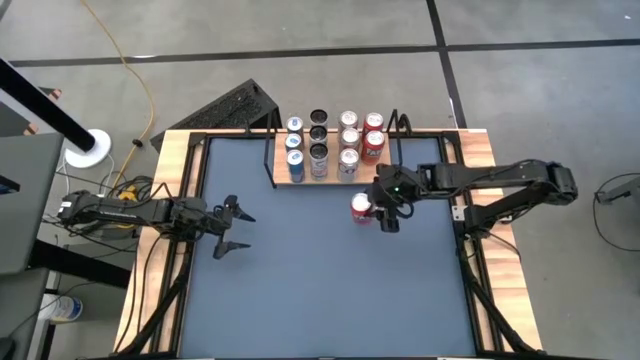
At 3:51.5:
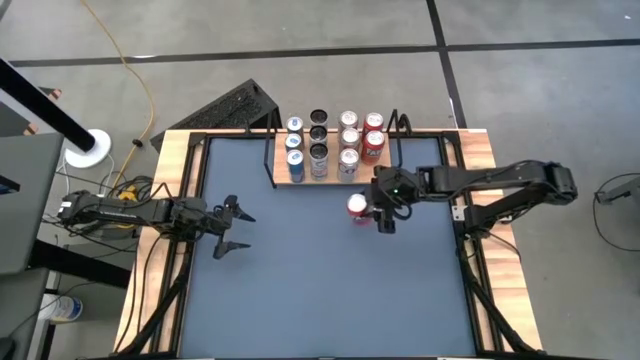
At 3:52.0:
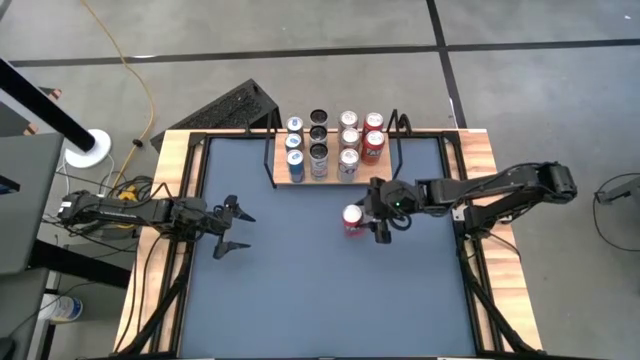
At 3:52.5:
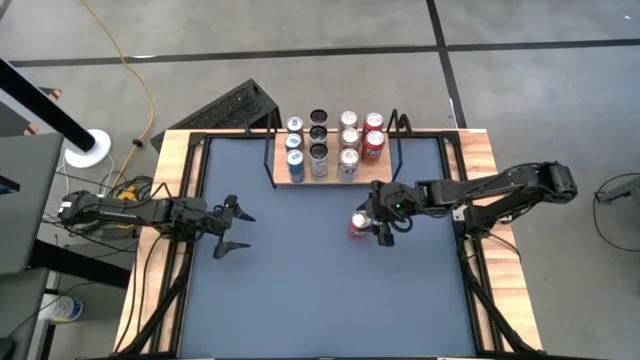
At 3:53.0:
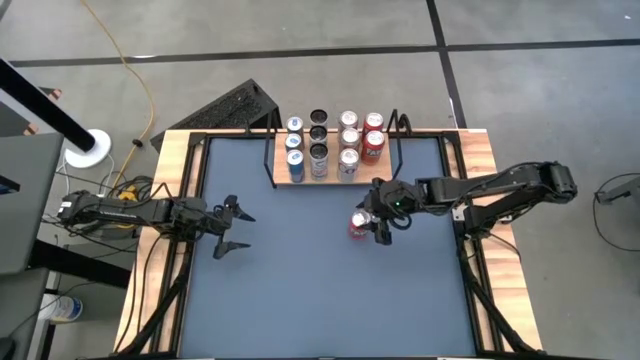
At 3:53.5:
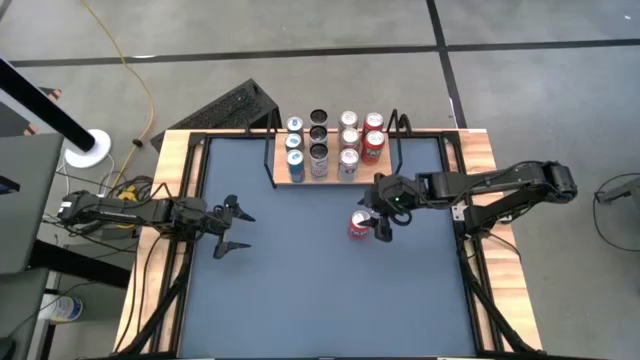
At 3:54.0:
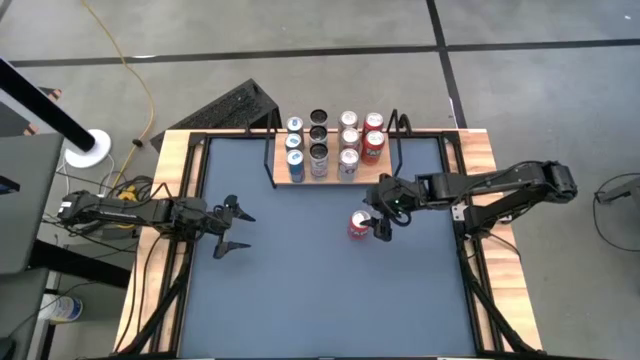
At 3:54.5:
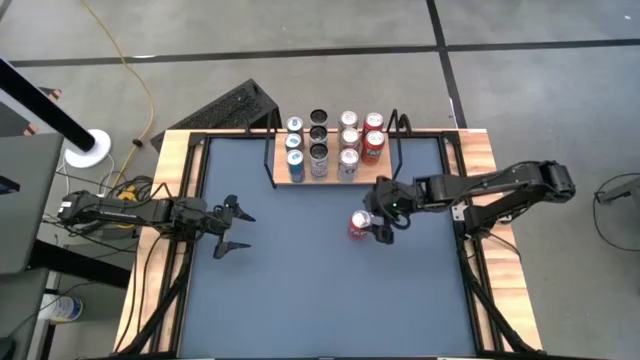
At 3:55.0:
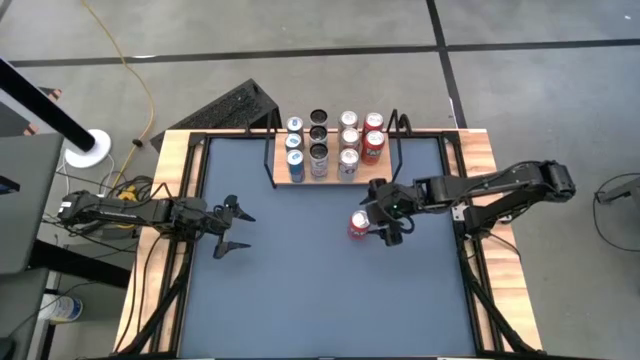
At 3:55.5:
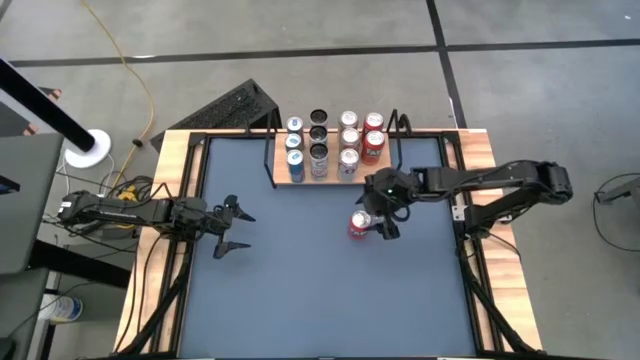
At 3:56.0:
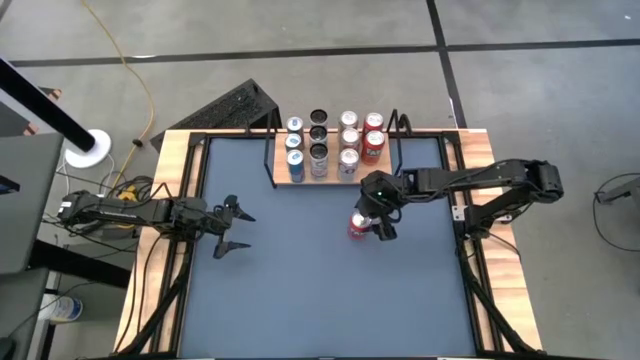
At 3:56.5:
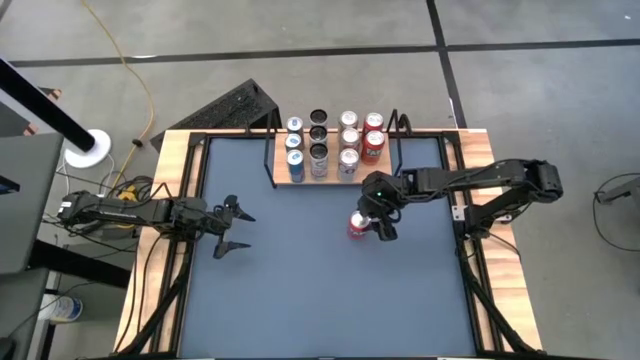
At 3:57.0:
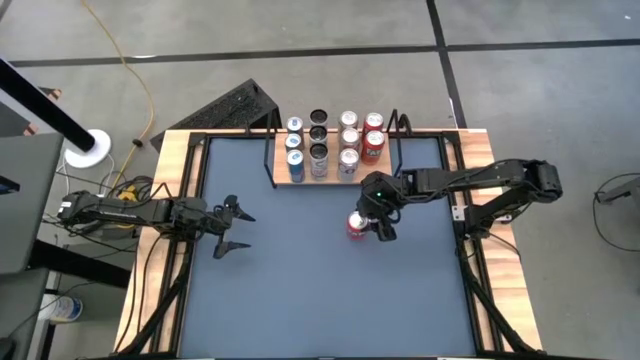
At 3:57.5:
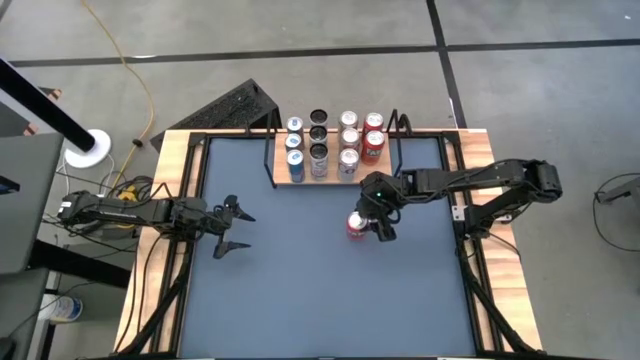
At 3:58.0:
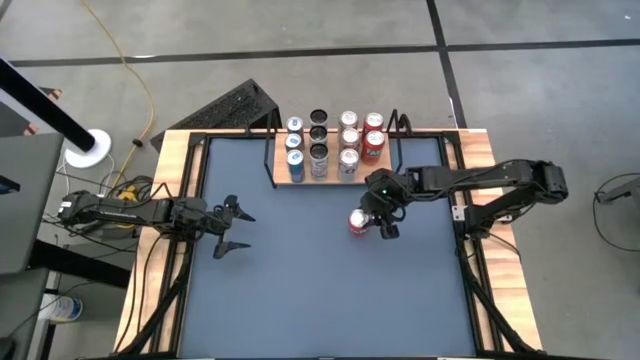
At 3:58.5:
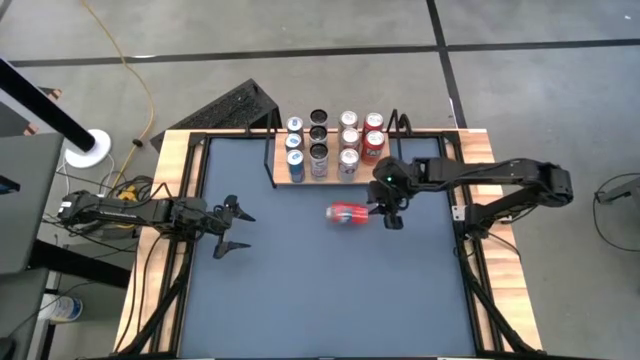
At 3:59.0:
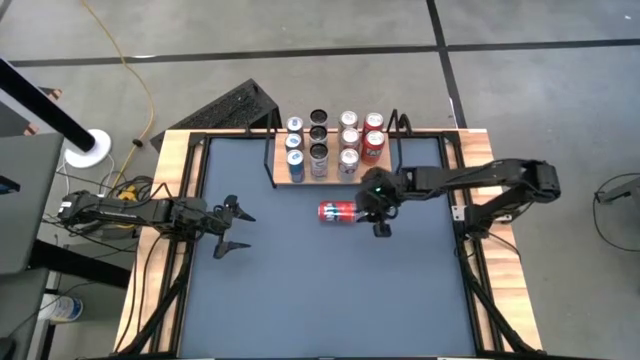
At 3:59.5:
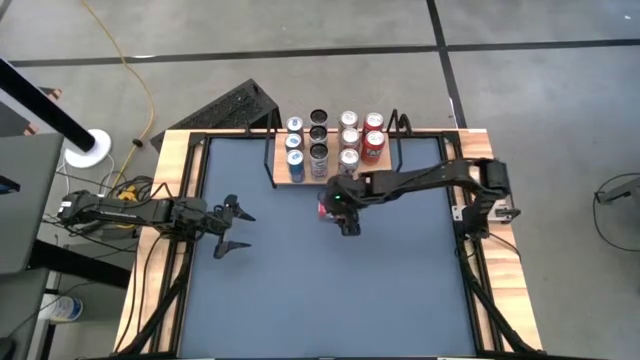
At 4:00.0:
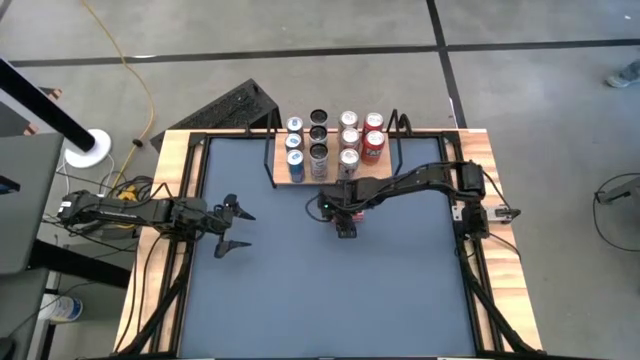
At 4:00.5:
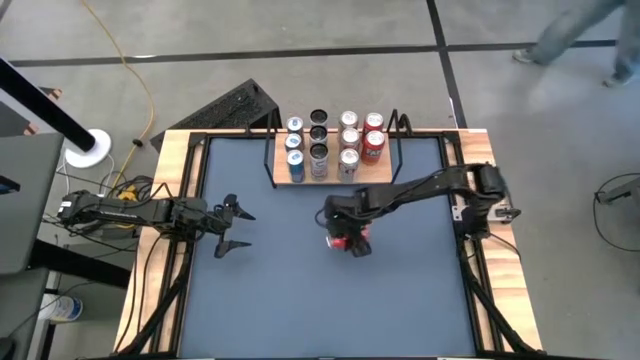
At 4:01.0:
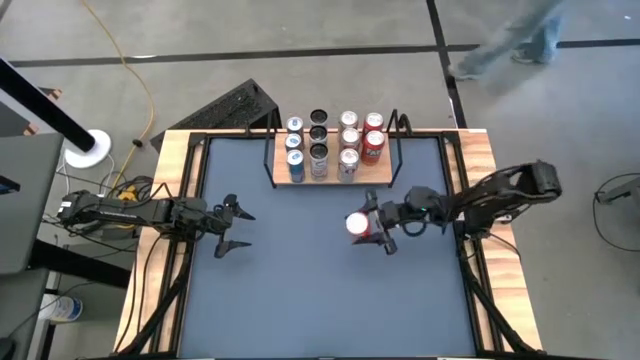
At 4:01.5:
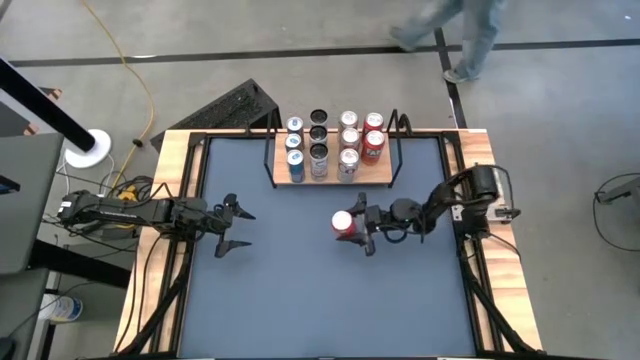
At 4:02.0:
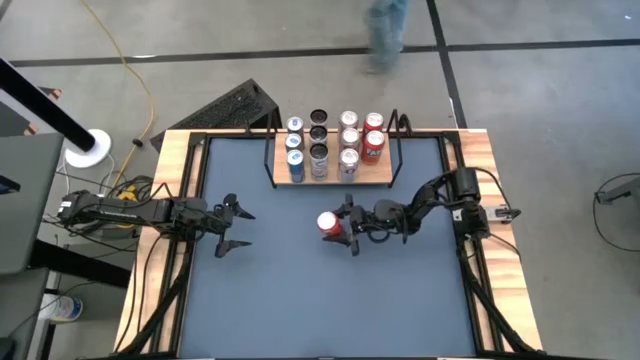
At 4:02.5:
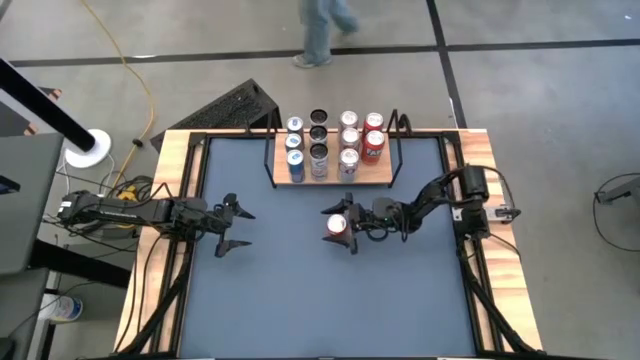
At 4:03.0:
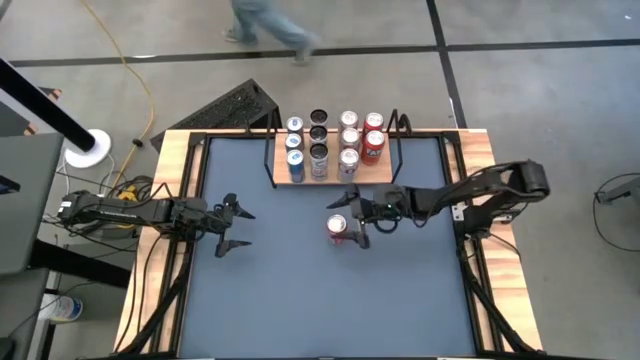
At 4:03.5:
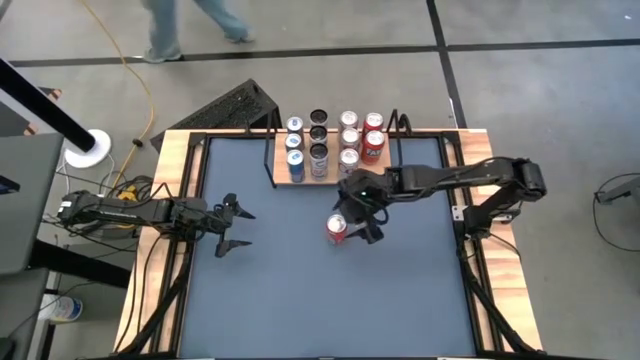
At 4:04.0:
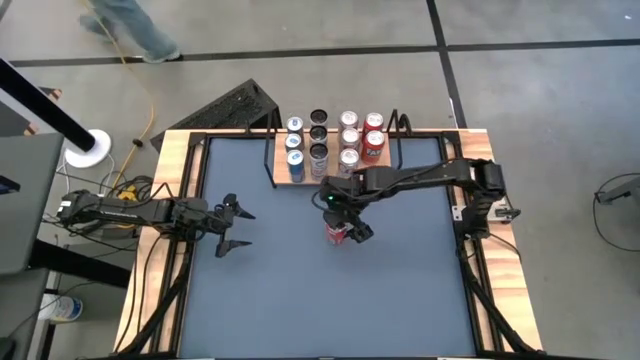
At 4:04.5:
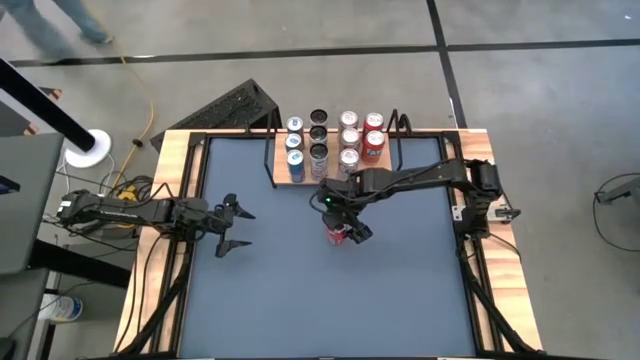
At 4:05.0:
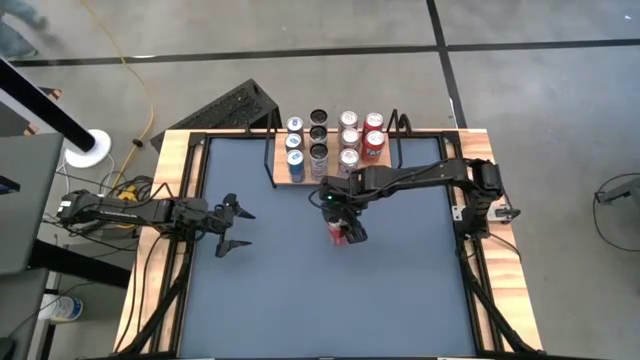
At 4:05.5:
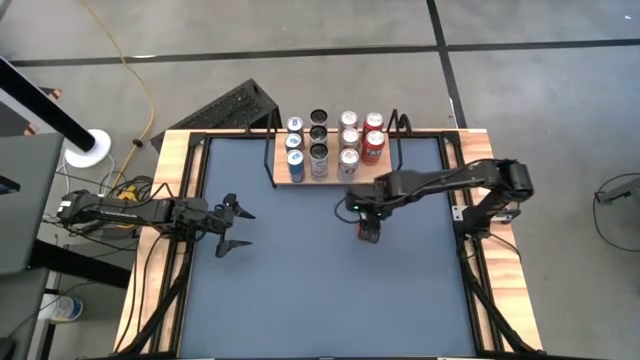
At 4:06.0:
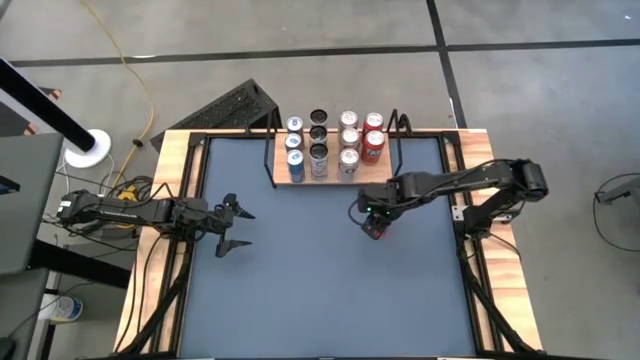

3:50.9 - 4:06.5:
Task: Place canned beverage on shelf
Put the red soda can on the shelf aligned with the other red soda can

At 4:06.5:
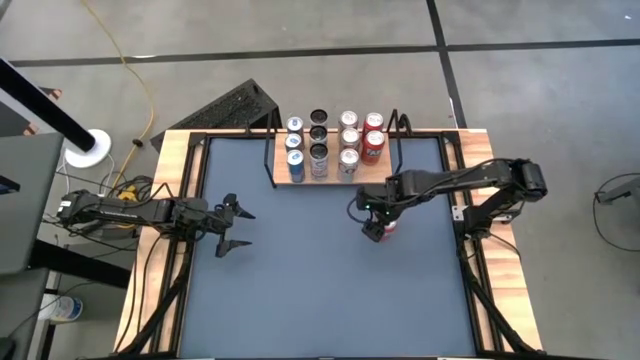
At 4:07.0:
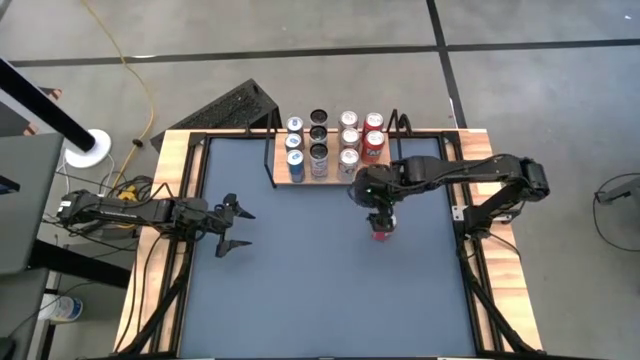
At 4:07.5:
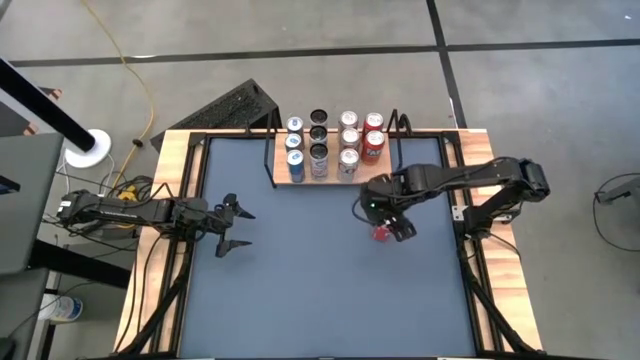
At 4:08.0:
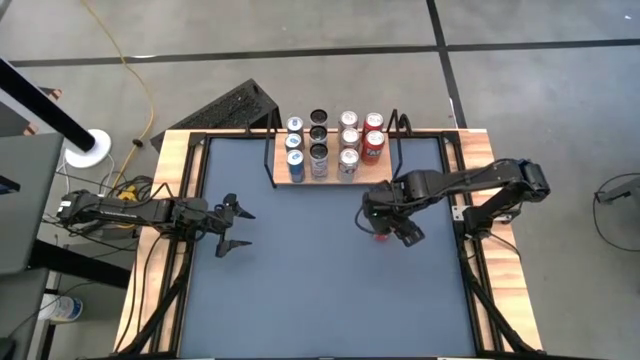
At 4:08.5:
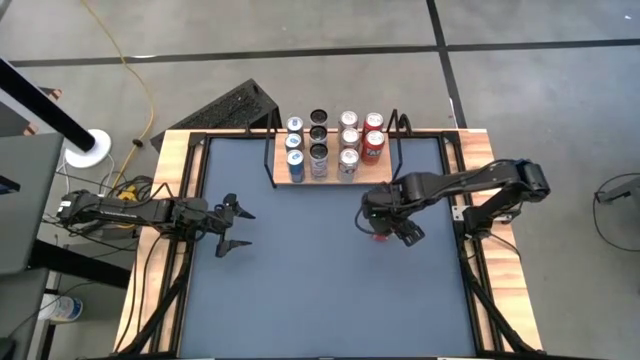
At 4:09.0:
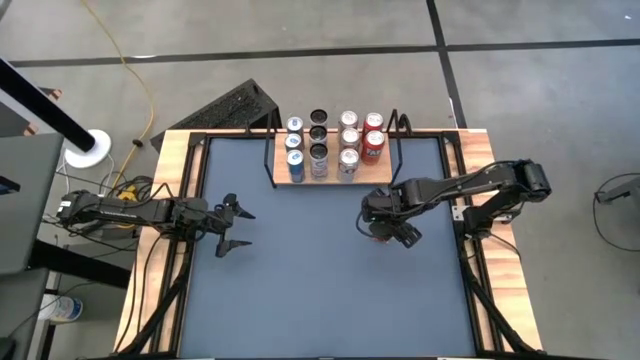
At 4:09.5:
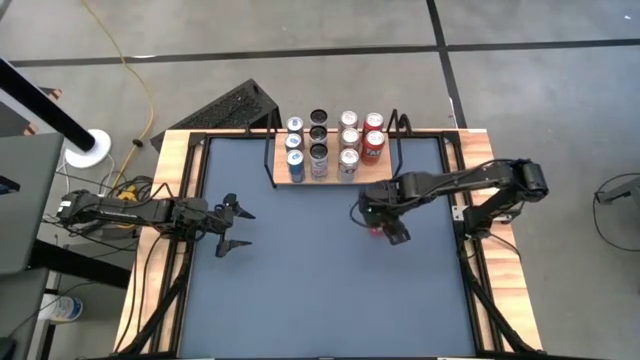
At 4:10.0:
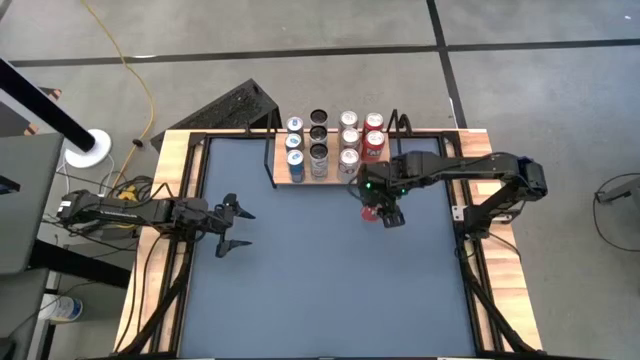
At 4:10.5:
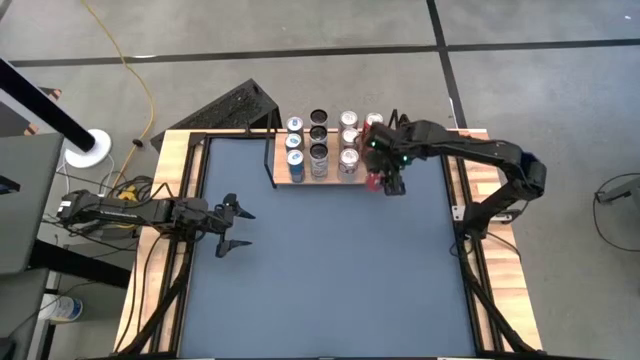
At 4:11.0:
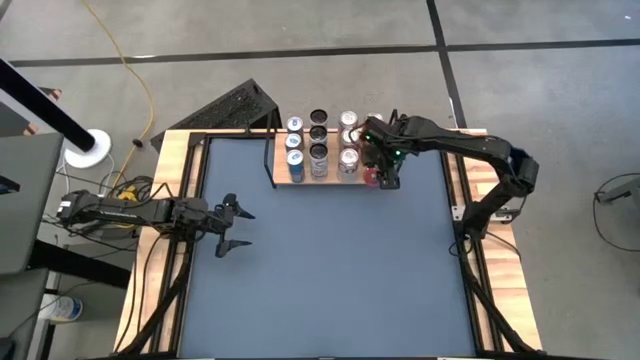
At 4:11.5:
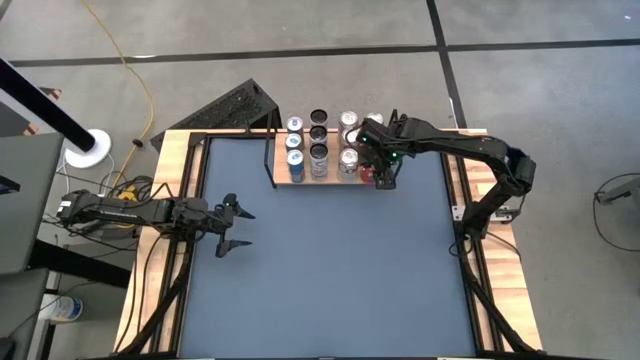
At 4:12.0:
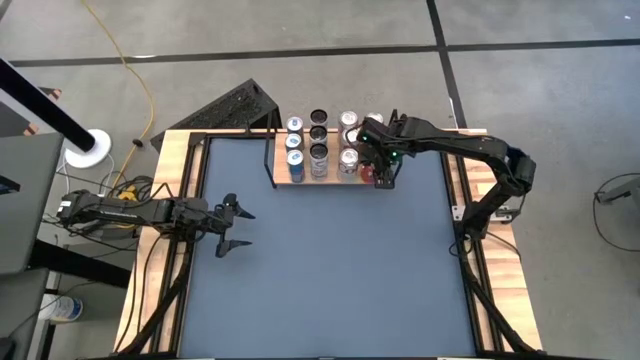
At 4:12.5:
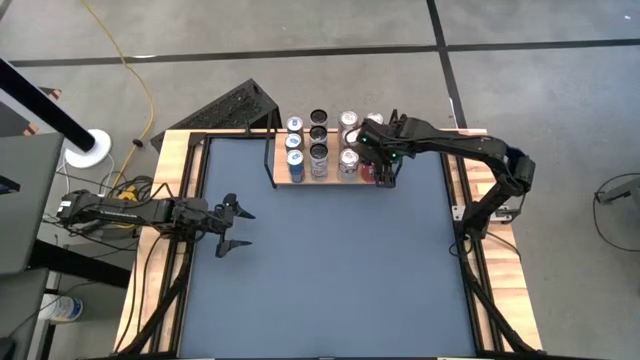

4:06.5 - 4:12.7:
Put the red soda can on the shelf aligned with the other red soda can
